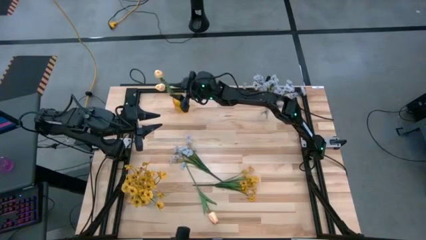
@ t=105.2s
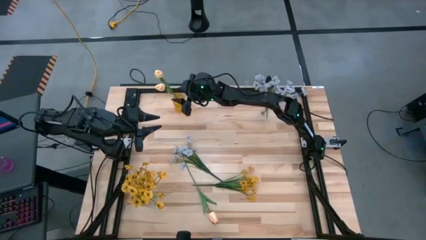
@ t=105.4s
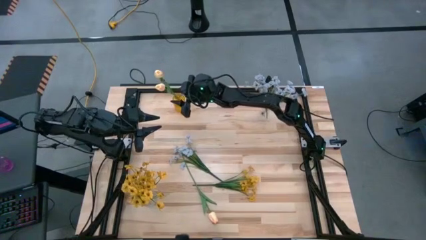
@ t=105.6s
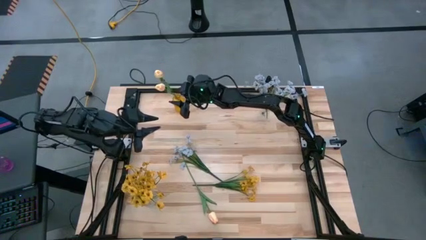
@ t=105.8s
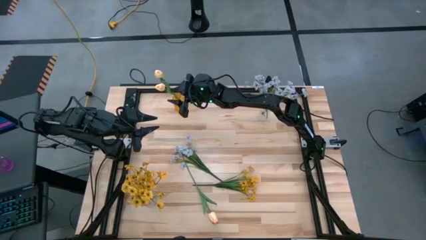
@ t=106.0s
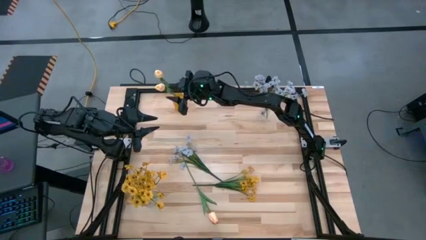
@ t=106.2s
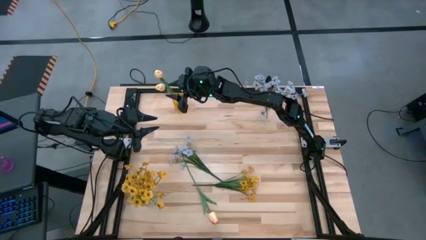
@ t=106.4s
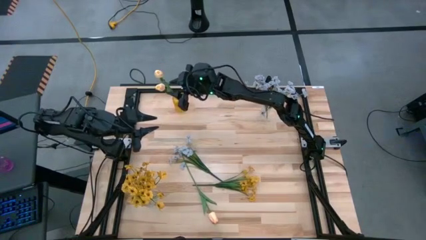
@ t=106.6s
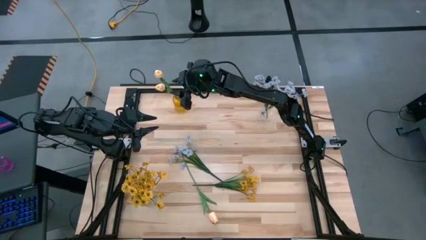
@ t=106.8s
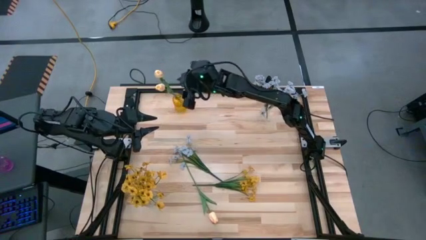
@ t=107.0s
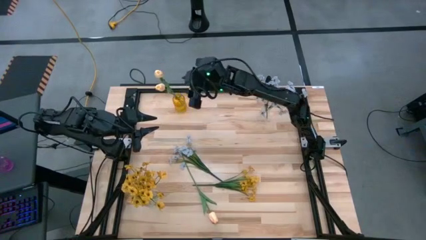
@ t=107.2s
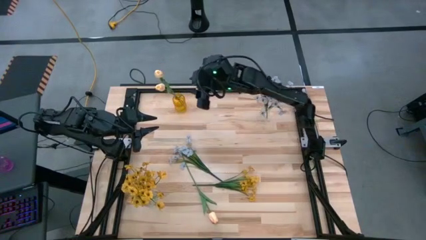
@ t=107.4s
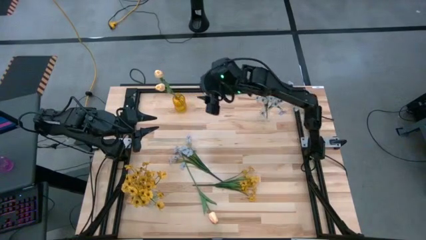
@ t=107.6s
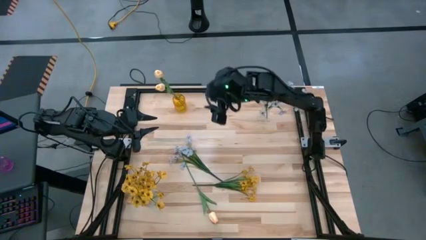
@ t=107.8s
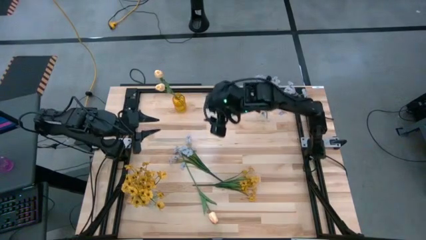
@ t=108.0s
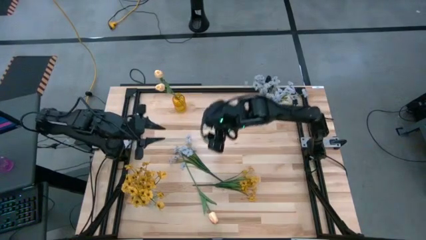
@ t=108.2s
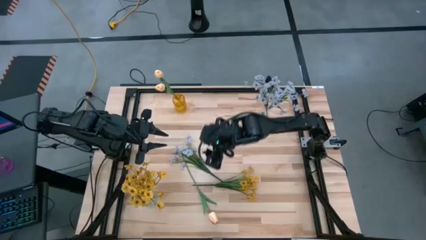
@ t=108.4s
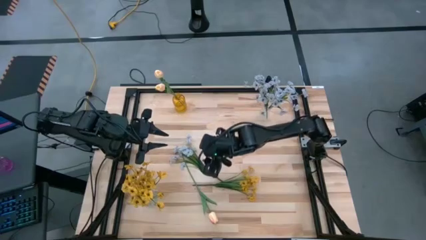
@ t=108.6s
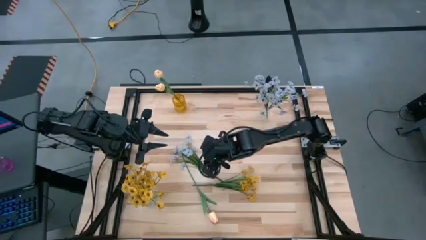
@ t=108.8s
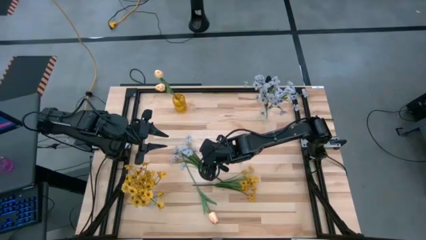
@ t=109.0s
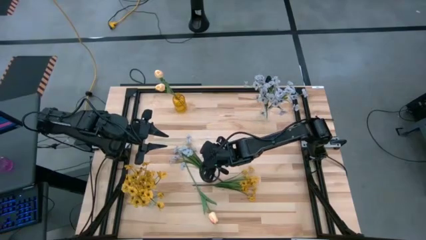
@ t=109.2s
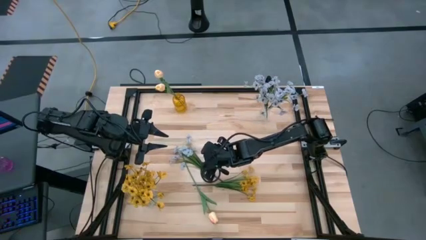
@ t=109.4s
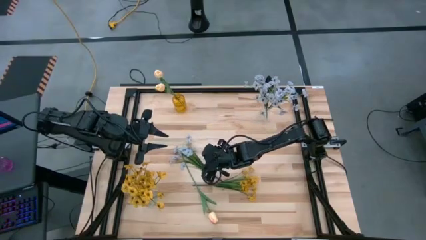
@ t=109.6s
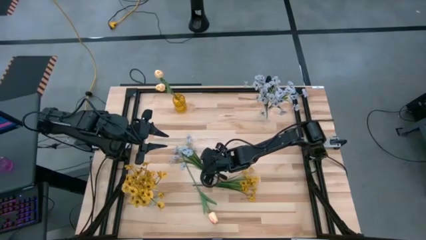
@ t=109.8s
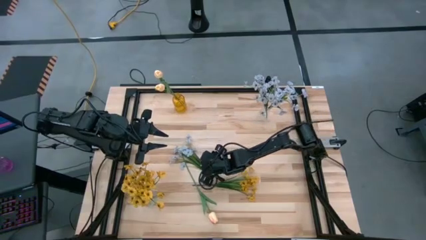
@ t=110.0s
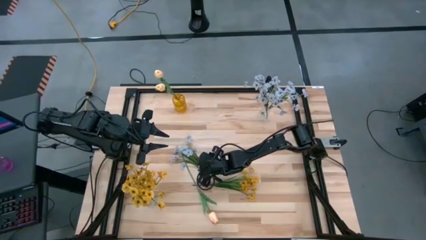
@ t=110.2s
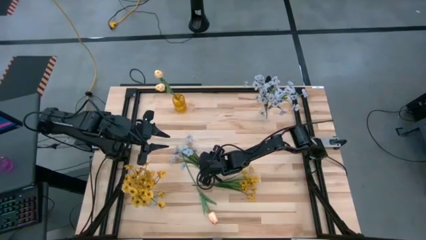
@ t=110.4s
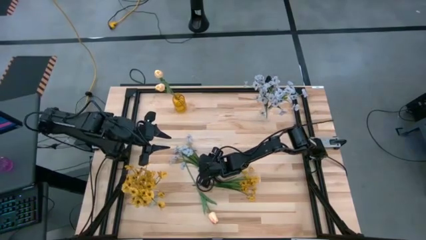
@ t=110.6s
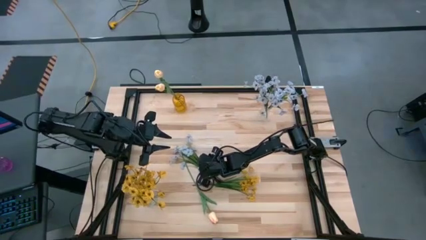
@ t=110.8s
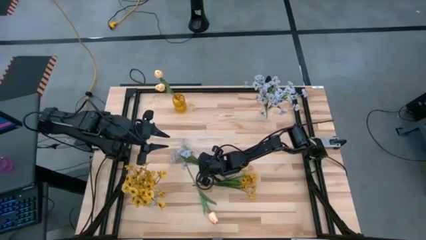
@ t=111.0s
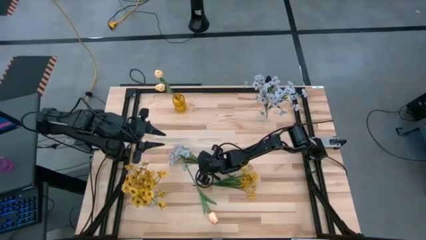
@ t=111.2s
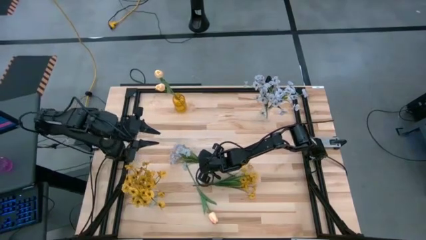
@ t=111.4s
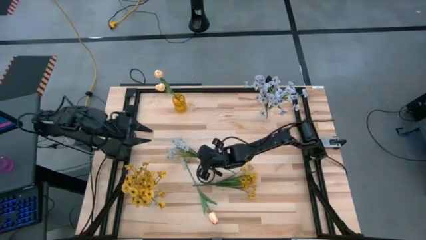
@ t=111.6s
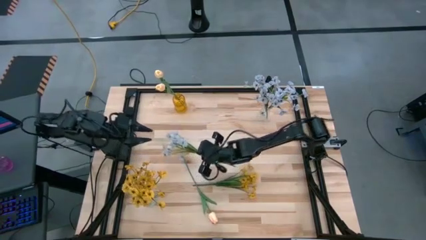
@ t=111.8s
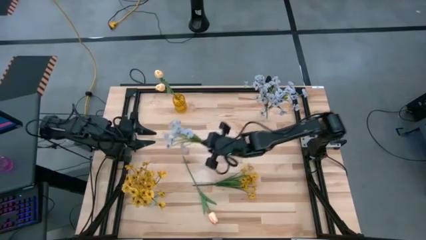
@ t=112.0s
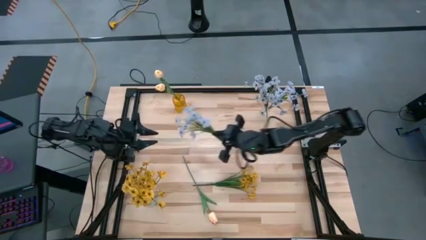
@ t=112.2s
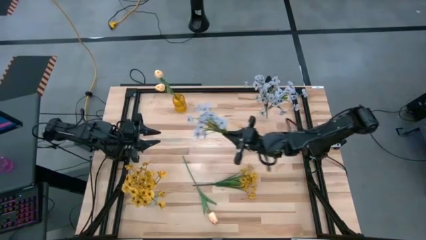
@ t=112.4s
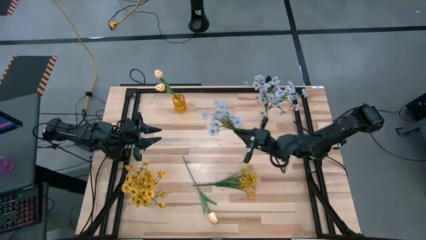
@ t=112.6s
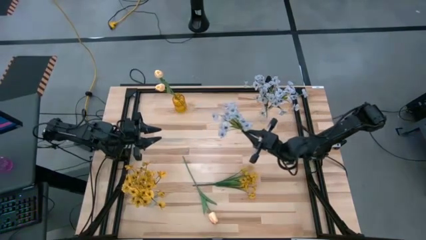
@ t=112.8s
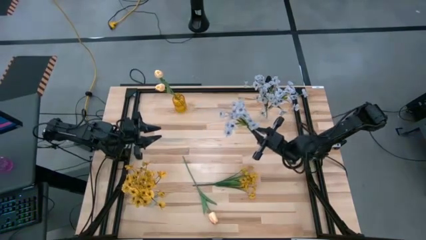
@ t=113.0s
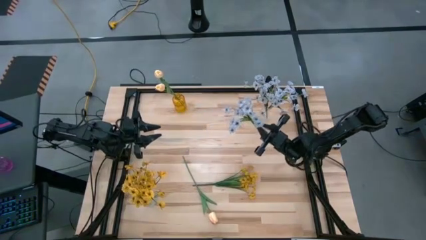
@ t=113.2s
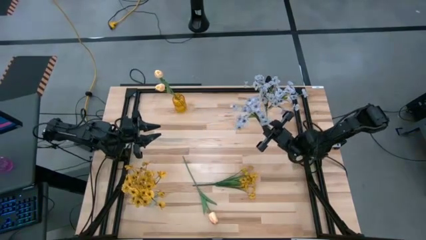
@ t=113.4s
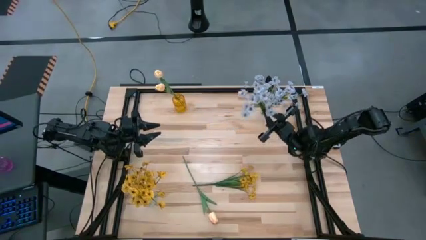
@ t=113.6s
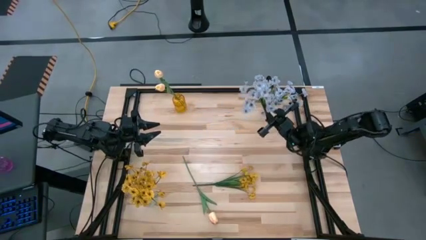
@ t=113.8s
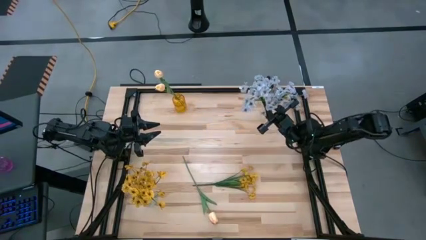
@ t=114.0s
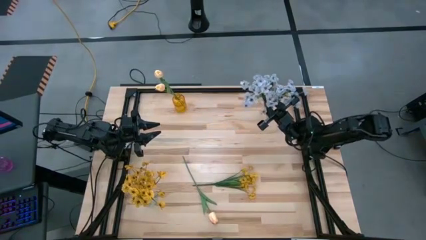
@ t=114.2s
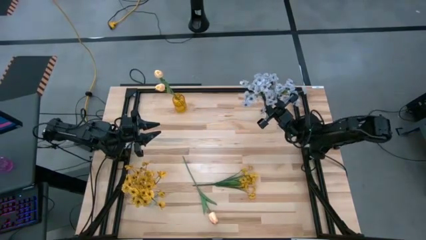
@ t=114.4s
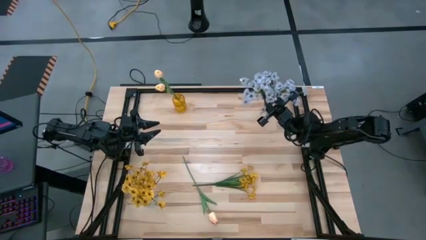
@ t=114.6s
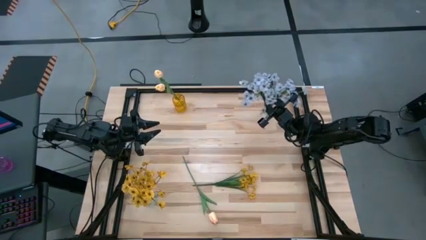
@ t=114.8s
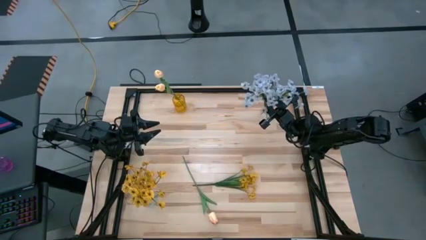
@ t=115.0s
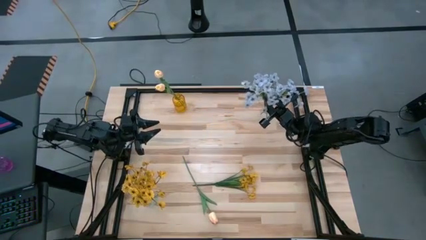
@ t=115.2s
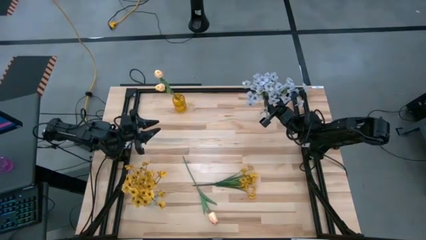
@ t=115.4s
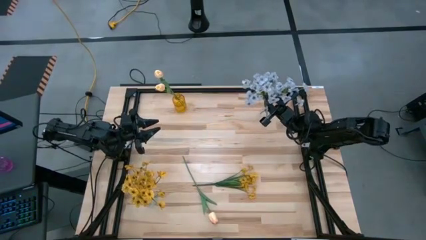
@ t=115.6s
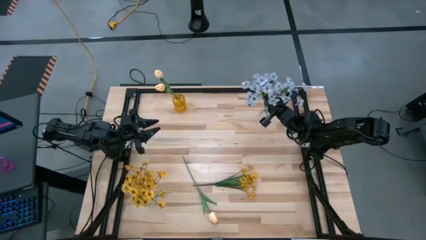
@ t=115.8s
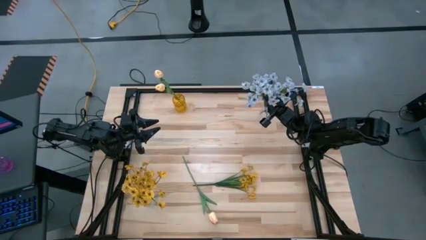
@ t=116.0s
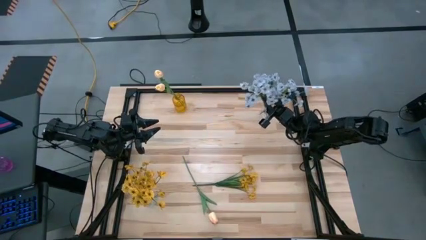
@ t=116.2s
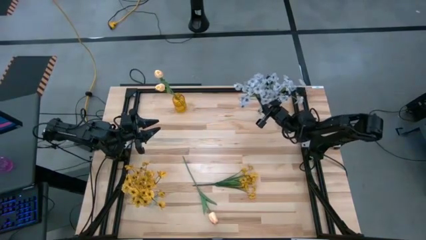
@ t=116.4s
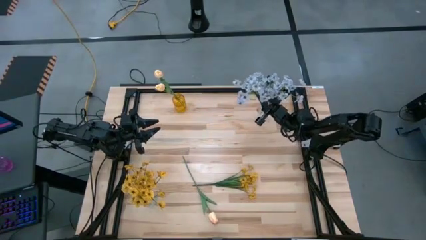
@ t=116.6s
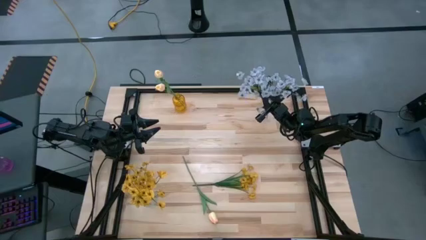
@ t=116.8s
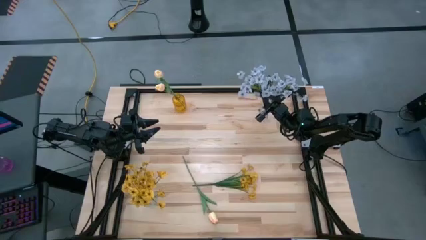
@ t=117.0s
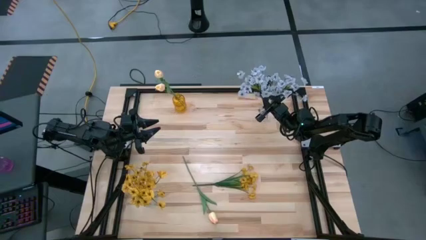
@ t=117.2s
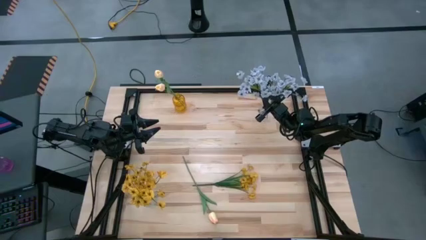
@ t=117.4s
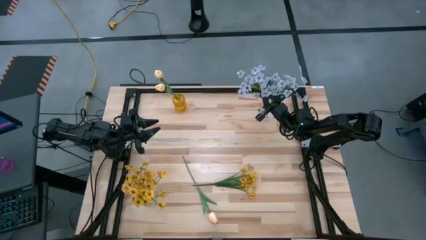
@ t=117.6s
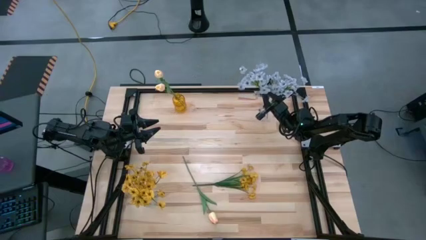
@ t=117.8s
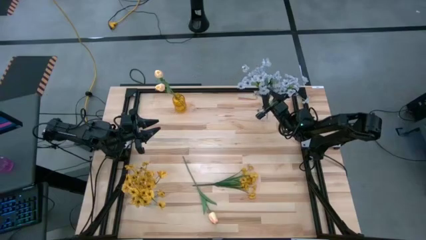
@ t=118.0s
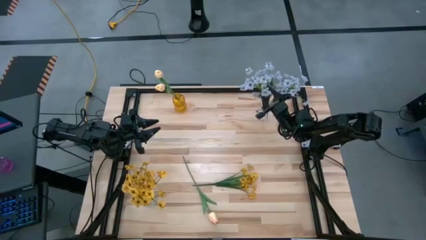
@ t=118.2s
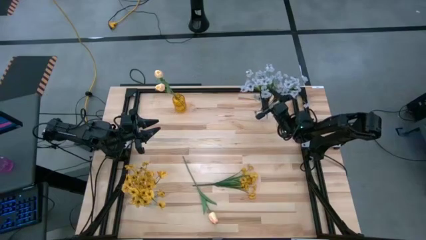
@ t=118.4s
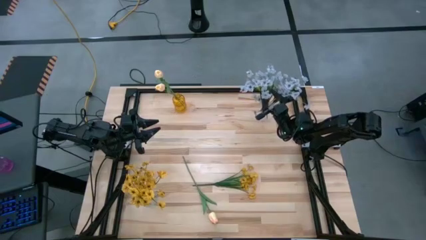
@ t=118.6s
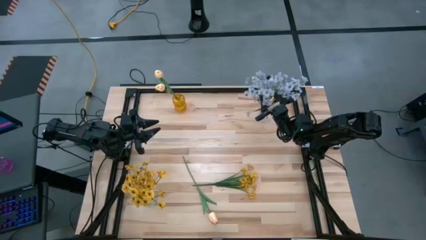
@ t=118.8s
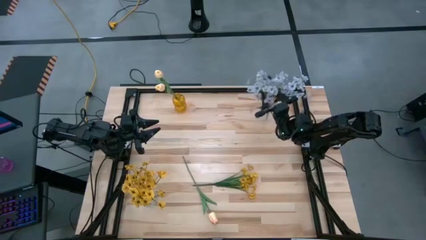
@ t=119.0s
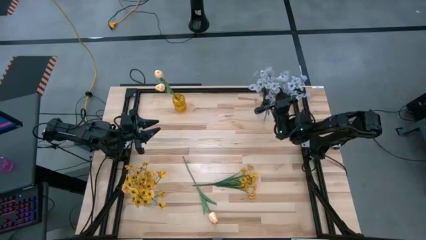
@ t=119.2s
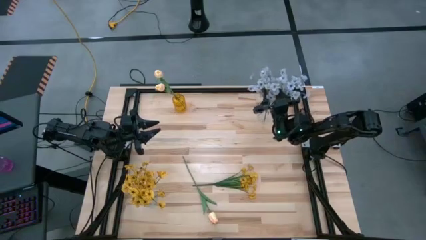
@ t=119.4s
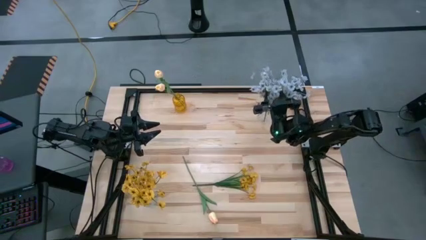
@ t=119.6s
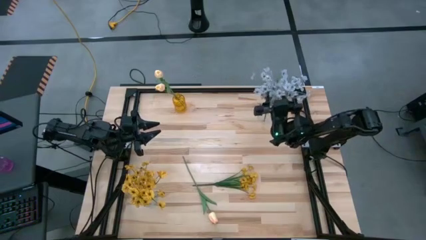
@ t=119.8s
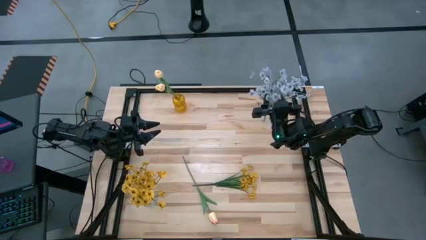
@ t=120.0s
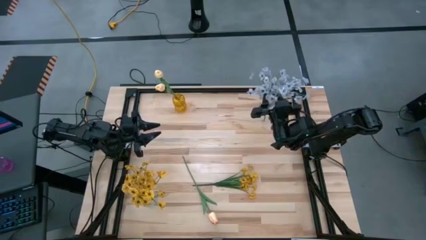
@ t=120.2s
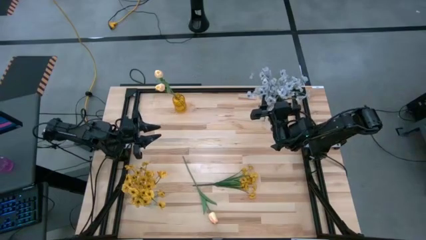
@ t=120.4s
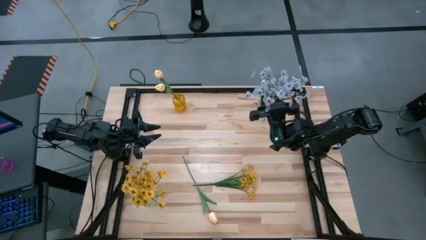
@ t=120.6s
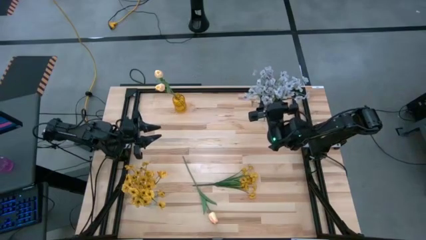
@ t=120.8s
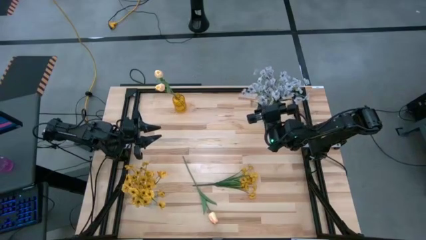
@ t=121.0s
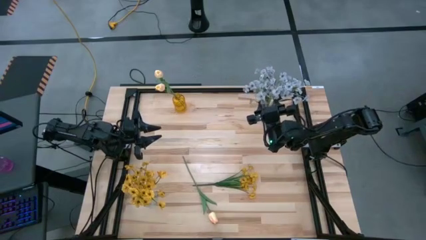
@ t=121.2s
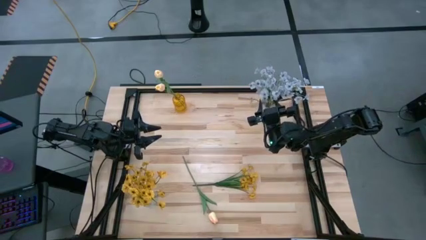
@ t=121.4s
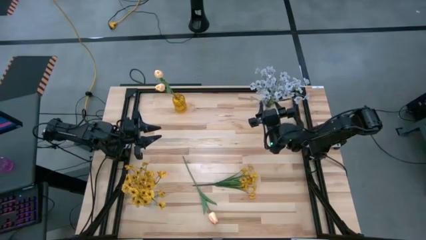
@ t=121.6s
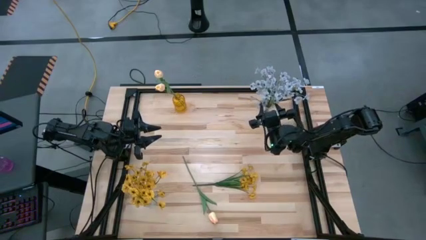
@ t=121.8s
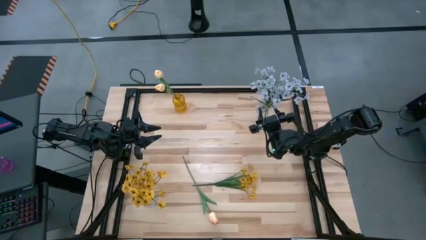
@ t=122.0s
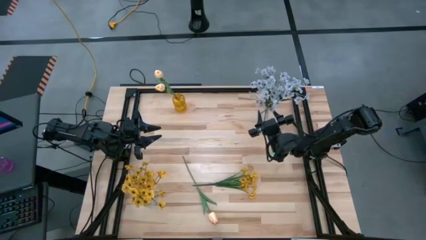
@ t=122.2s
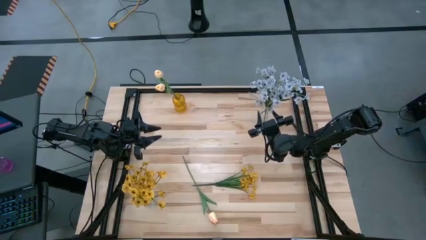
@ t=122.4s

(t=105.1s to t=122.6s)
Task: Sort flowers into vase by color
Put the white flowers into the top transparent vase
